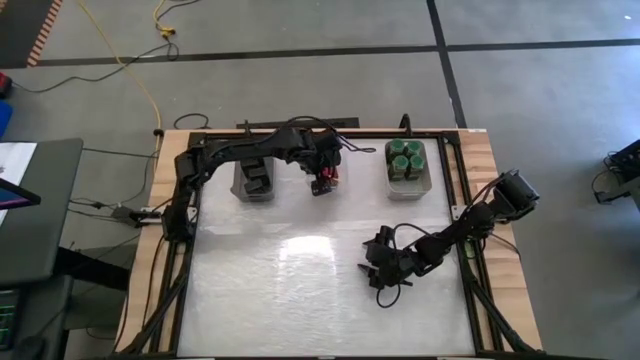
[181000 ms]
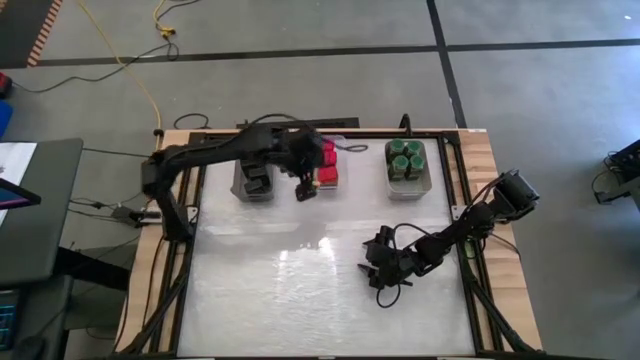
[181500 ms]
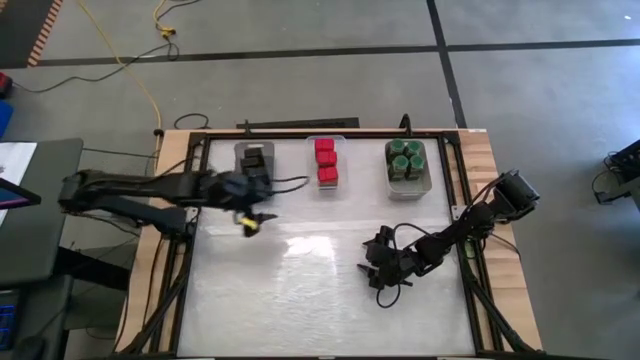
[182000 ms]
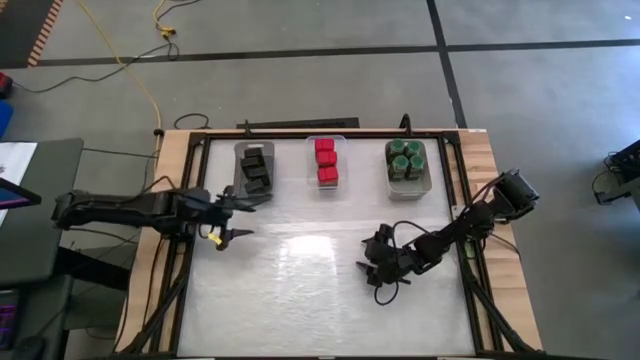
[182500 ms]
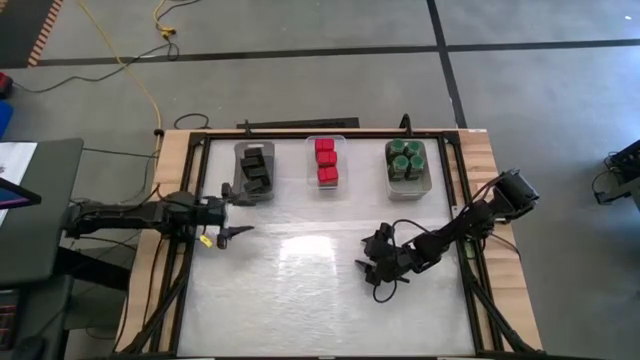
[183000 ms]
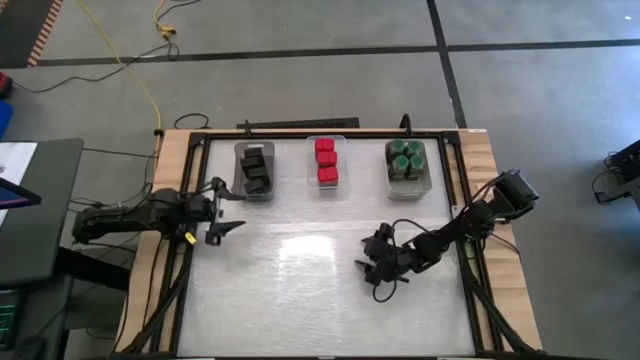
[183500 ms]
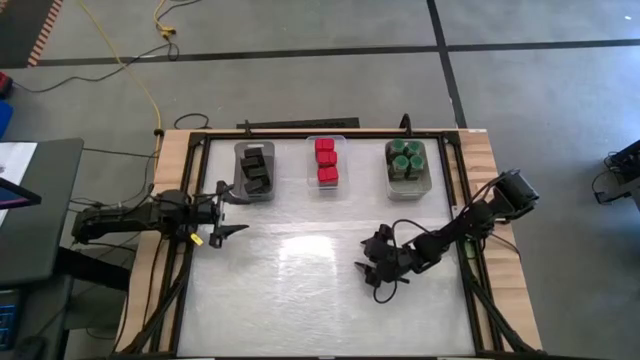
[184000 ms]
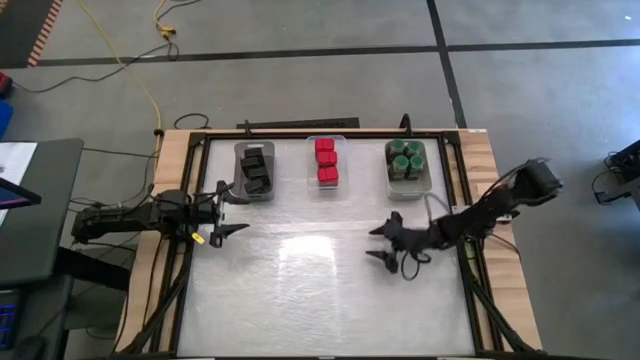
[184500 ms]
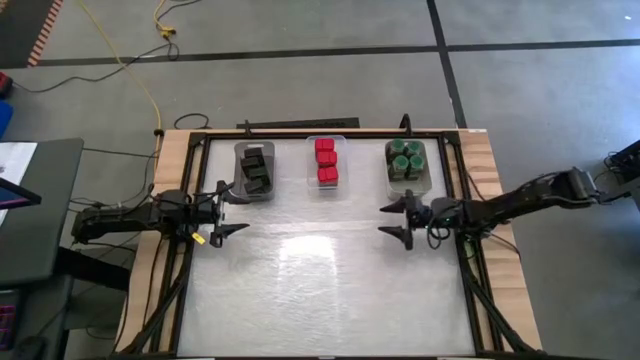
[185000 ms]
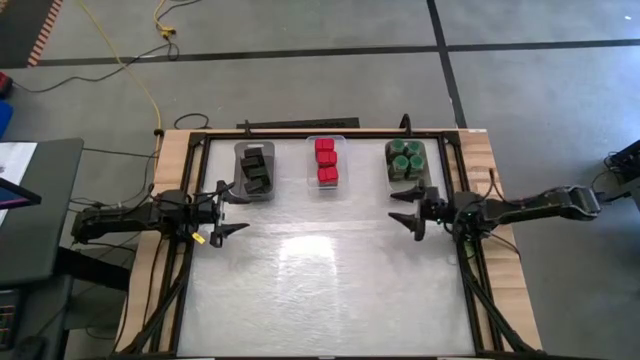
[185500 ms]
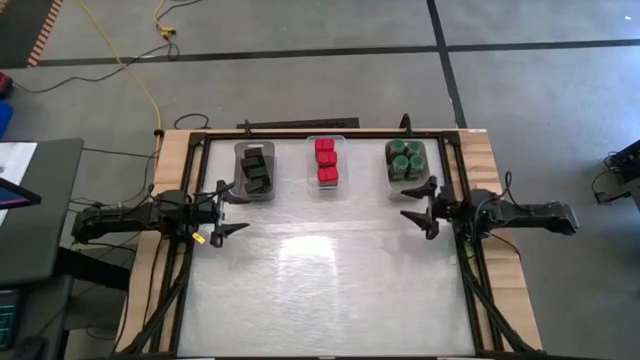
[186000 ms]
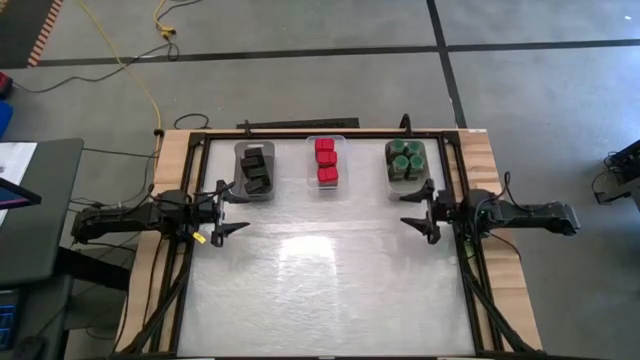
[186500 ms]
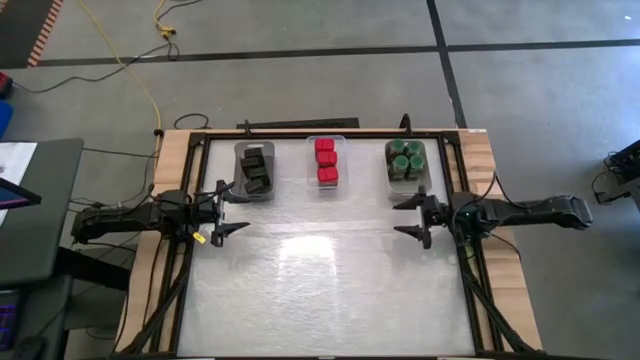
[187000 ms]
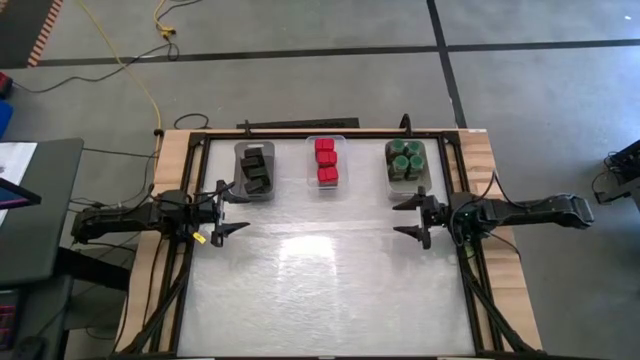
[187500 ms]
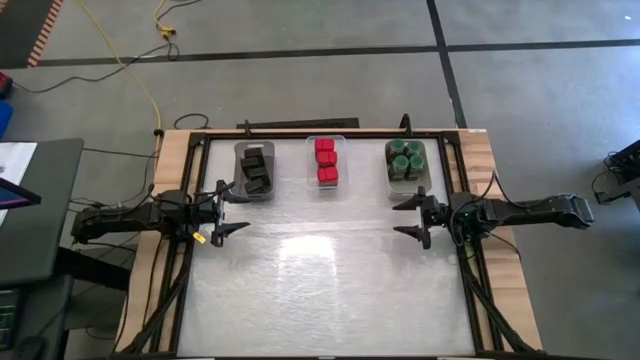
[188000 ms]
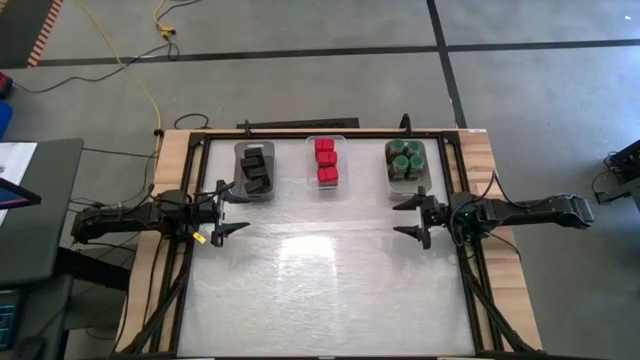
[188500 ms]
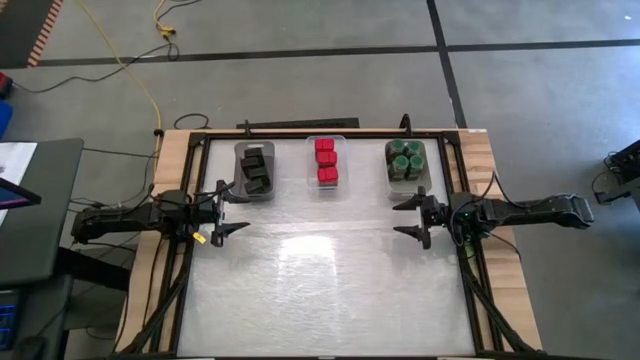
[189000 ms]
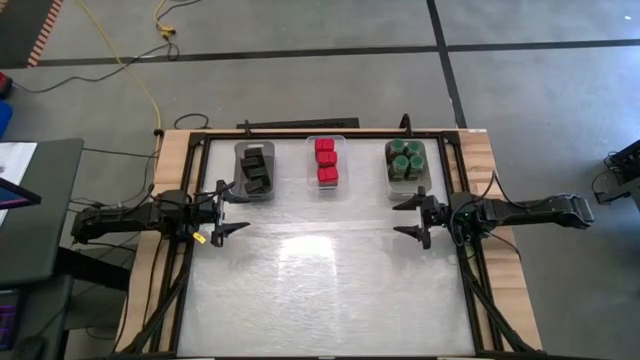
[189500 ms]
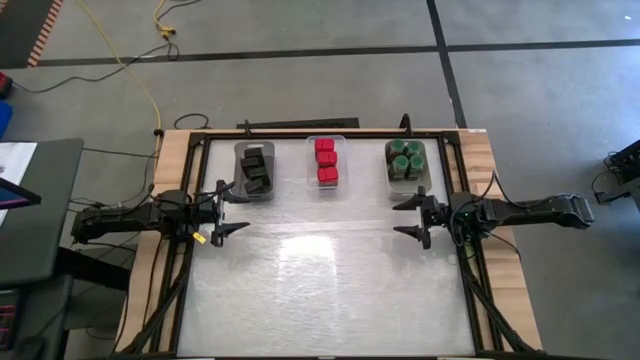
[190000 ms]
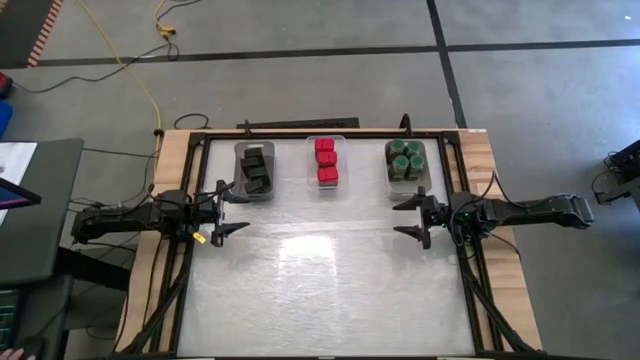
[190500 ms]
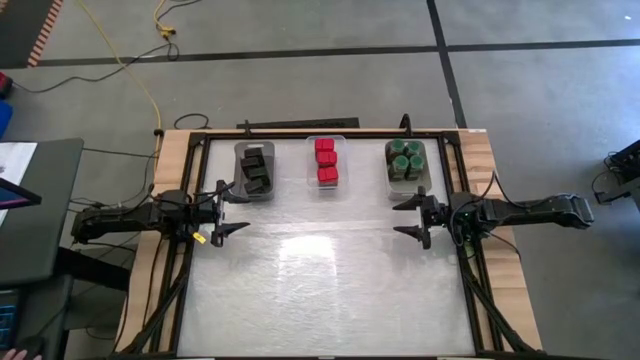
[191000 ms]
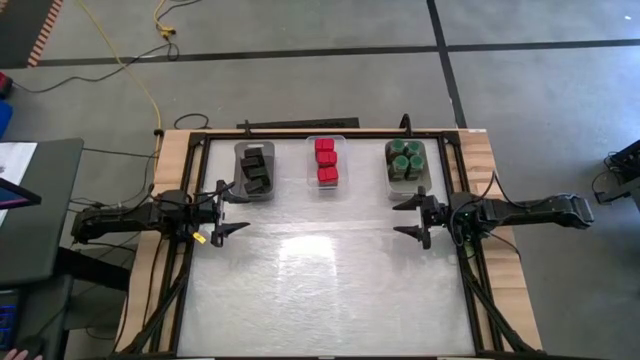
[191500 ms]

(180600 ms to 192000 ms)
Task: Sort spices by type
Return to Home Position
